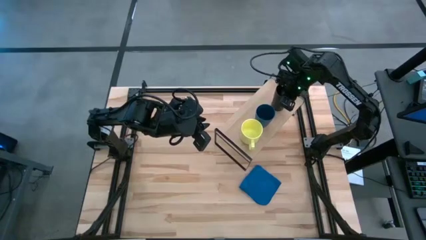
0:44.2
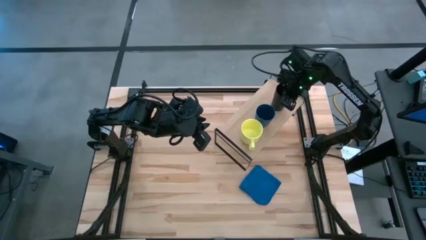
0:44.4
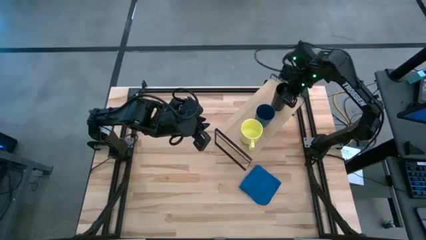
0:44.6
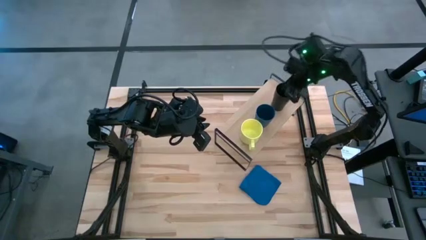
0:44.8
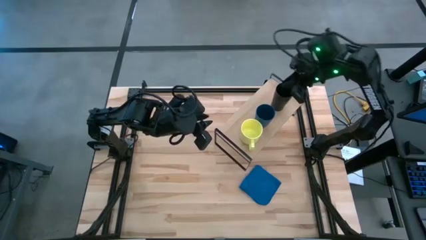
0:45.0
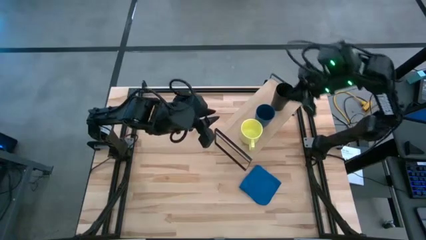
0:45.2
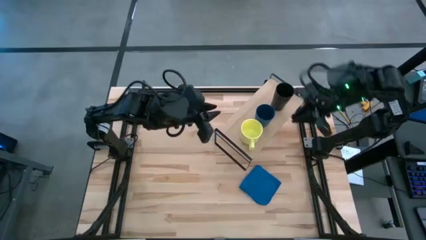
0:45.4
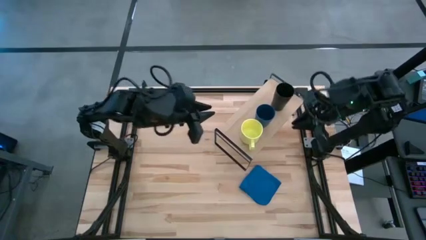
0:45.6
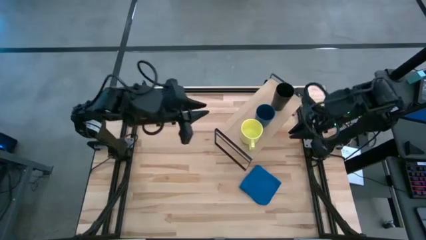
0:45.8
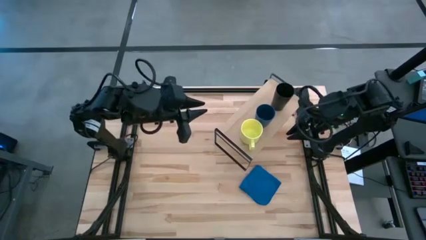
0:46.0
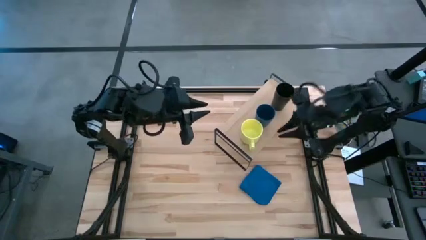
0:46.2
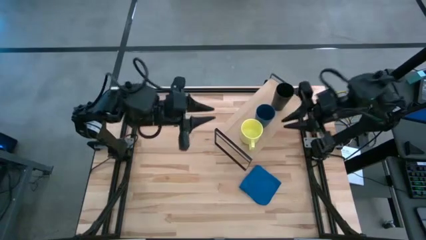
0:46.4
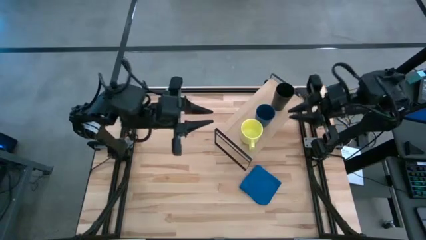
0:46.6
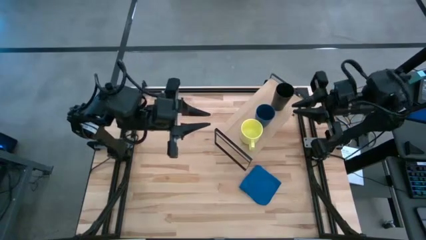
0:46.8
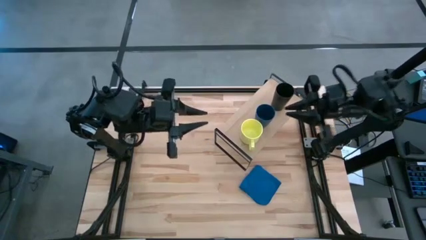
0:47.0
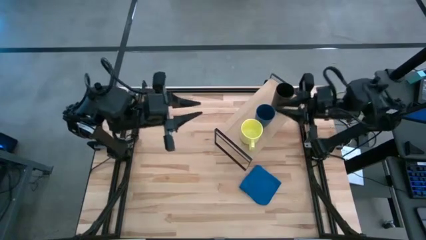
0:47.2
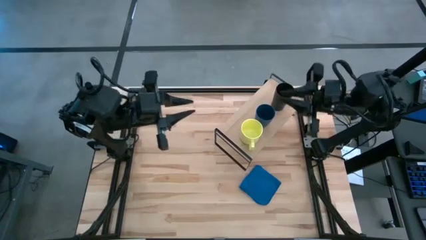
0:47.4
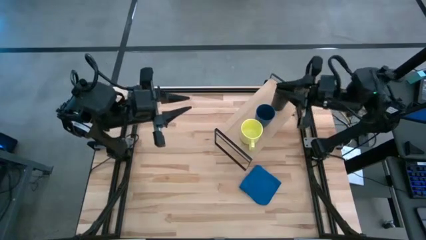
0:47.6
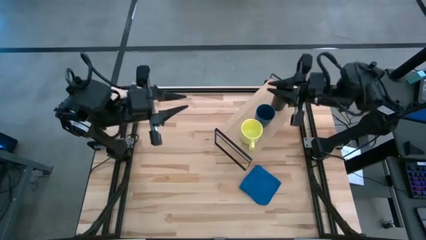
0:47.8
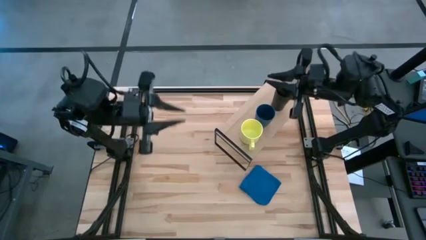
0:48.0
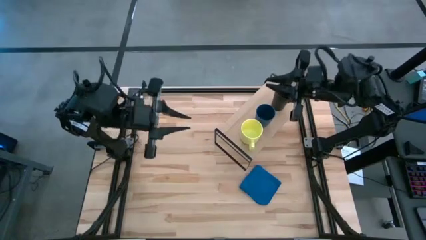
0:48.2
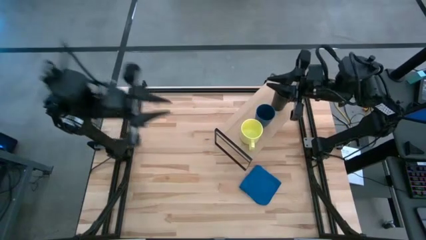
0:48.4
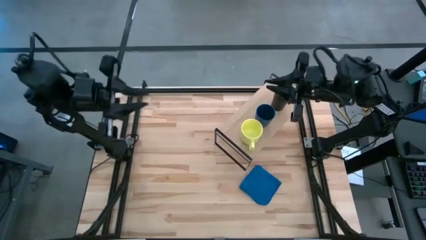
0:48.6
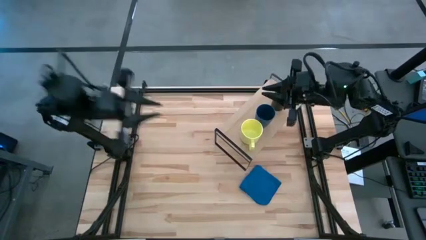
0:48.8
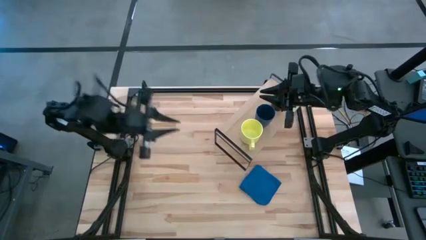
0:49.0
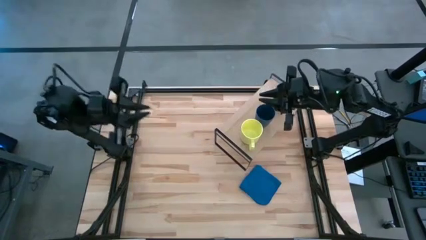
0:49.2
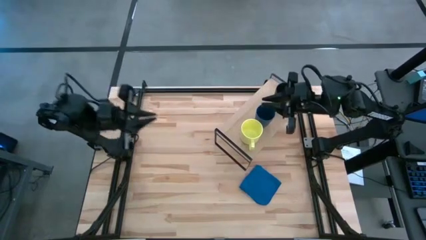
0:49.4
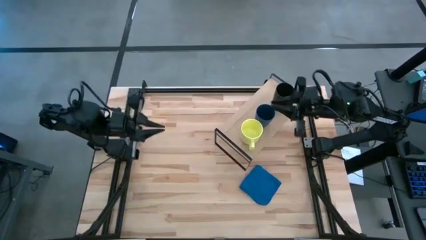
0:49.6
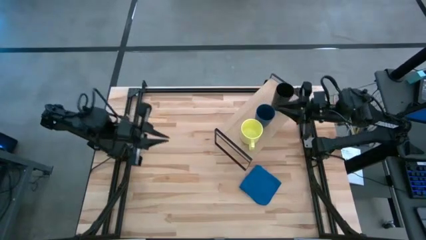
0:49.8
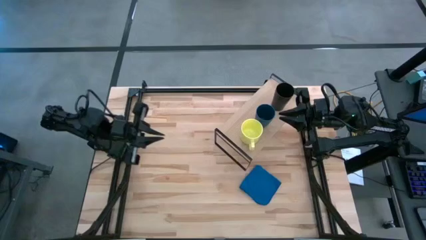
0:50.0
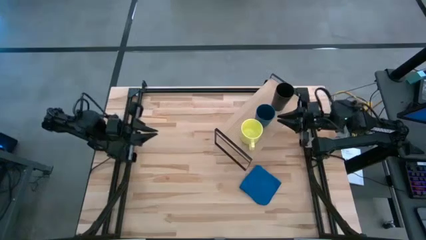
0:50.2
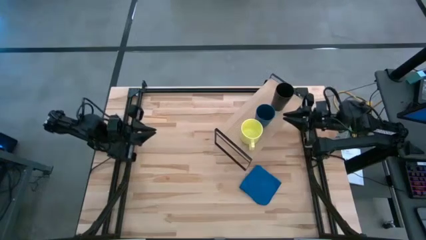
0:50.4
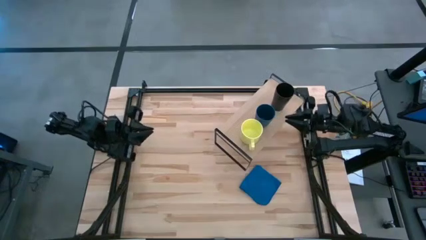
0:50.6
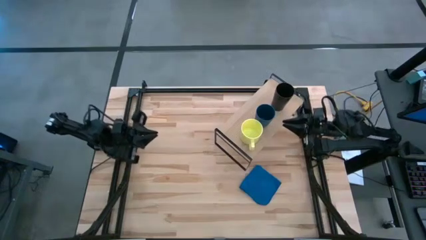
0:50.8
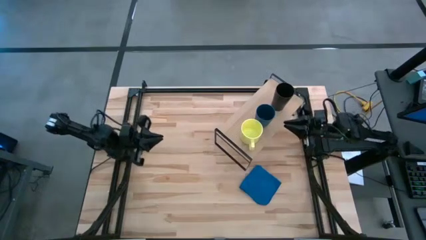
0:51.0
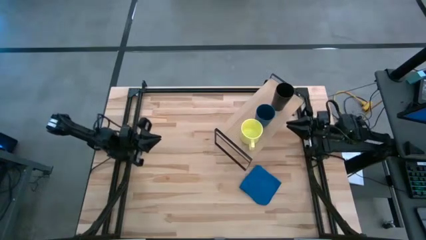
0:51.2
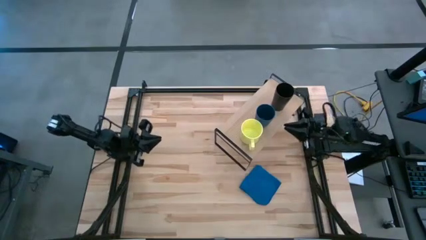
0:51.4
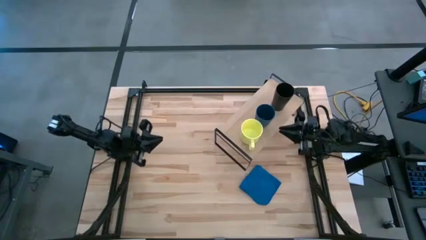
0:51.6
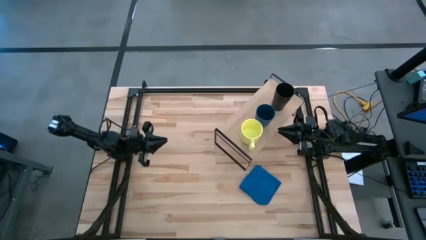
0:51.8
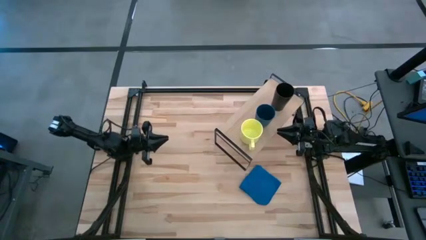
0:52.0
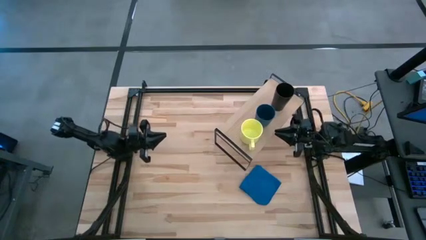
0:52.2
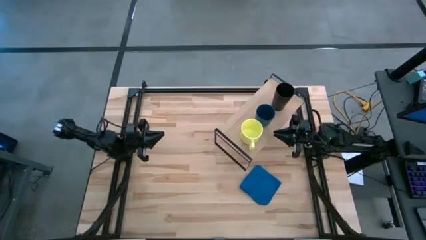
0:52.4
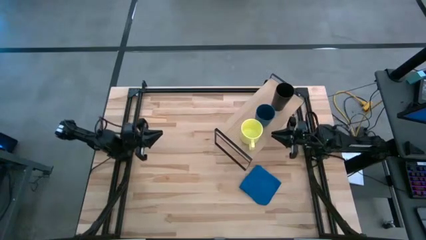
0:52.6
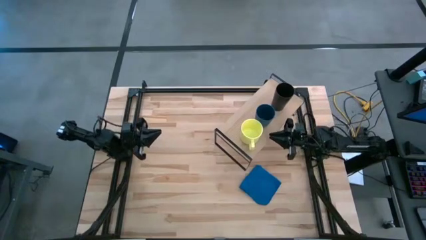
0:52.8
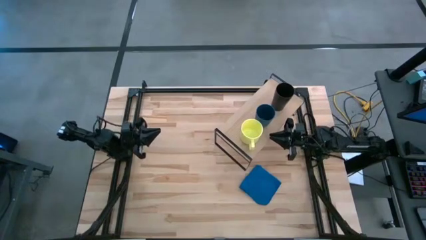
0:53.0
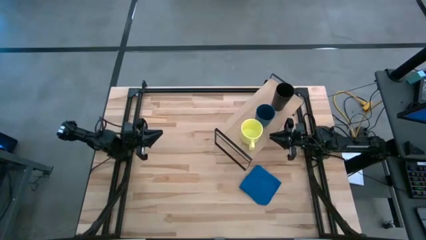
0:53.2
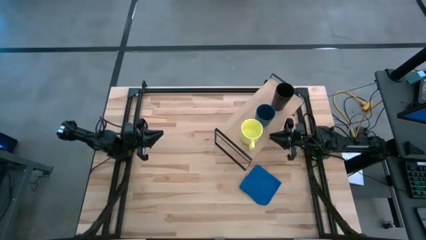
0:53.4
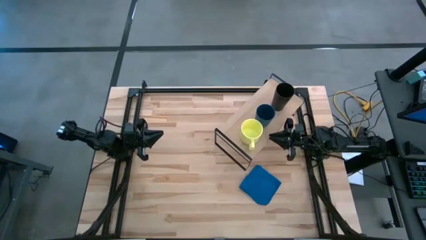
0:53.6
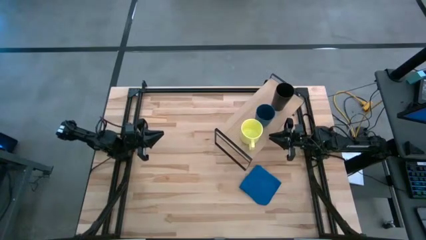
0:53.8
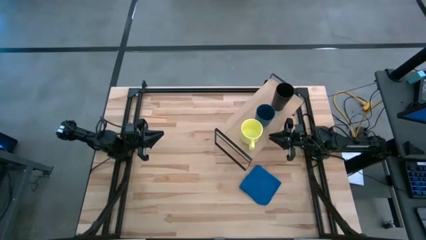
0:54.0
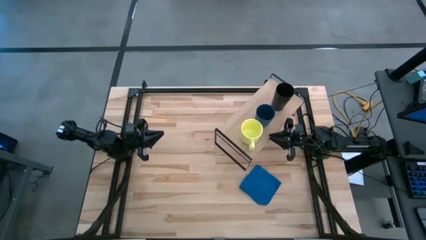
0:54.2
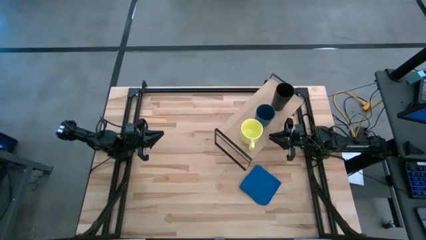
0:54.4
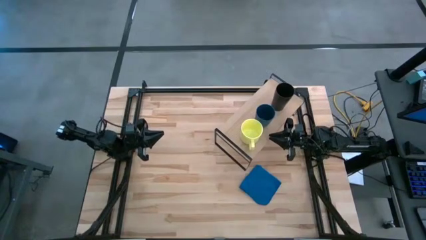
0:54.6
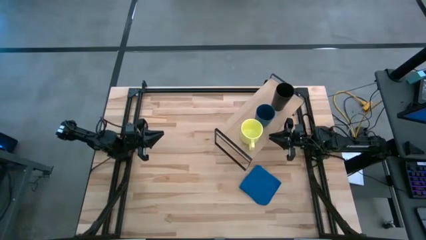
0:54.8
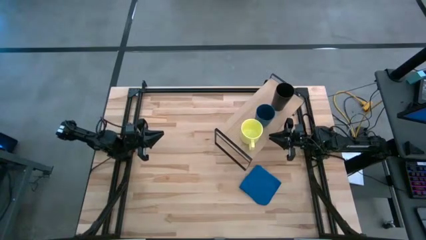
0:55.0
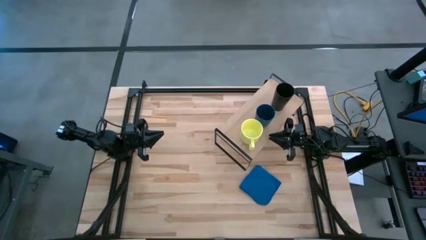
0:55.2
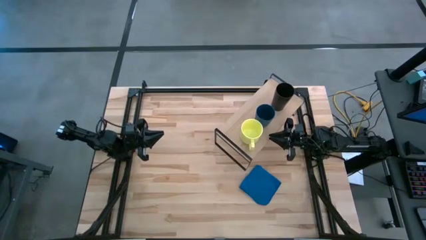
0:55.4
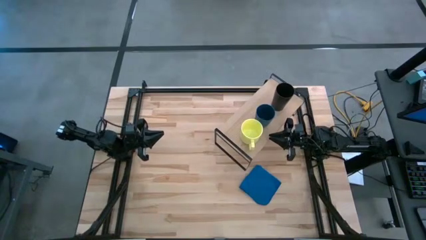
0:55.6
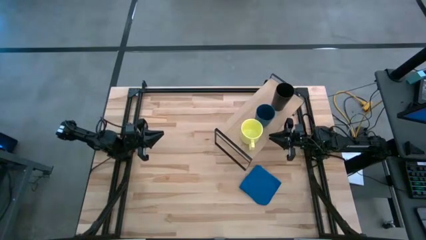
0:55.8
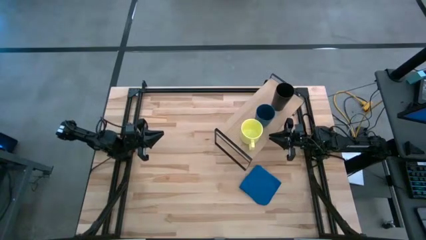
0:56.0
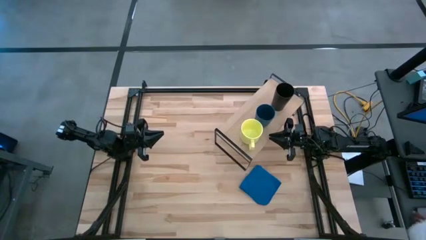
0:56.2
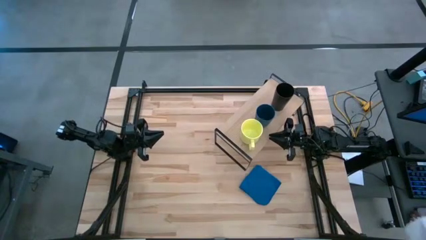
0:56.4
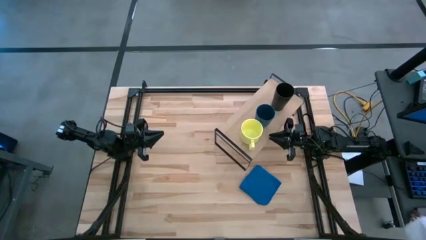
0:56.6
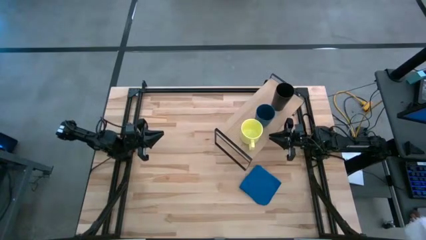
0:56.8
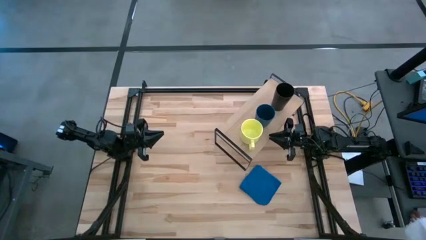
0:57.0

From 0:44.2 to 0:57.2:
Task: Stack small to large cups/mugs on shelf
Return to Home Position
